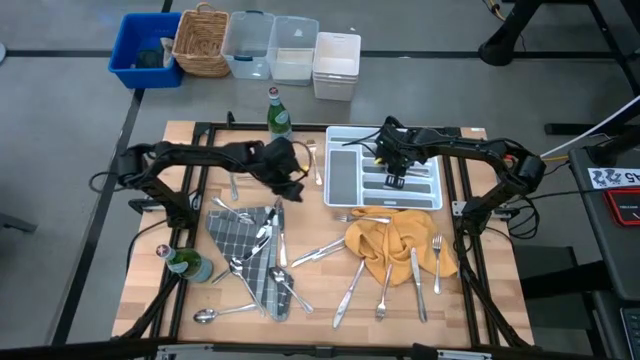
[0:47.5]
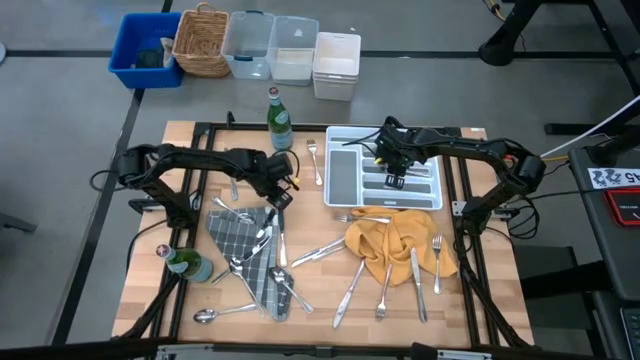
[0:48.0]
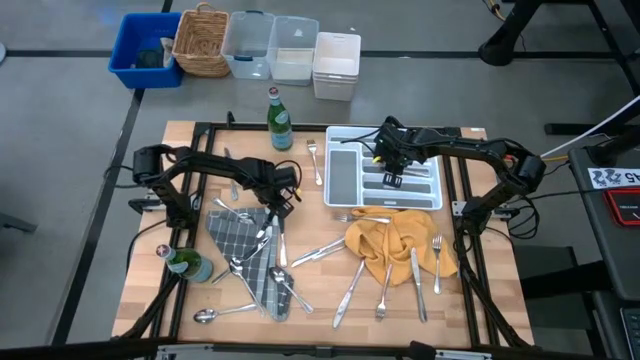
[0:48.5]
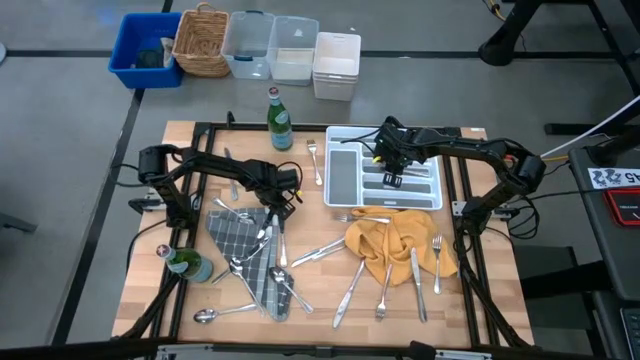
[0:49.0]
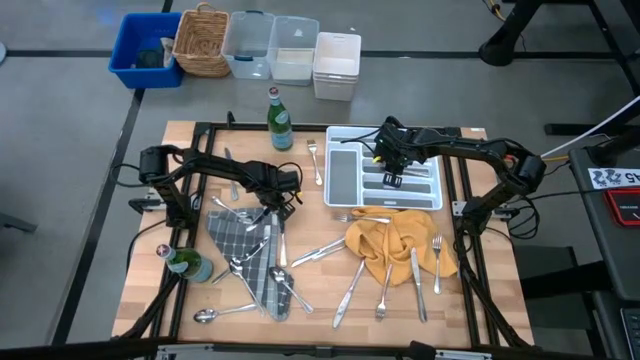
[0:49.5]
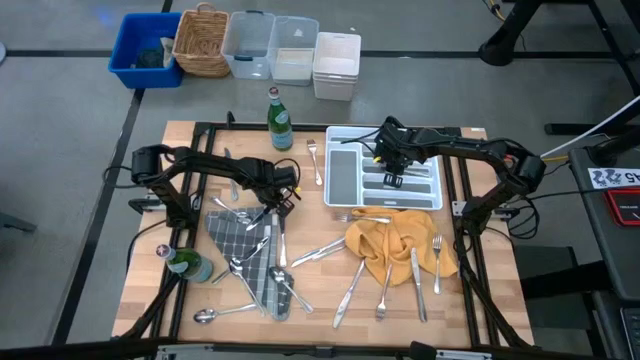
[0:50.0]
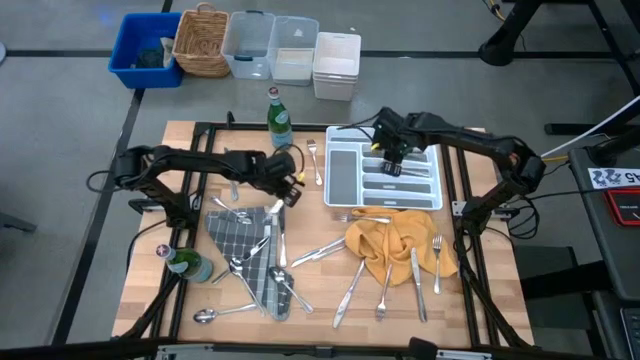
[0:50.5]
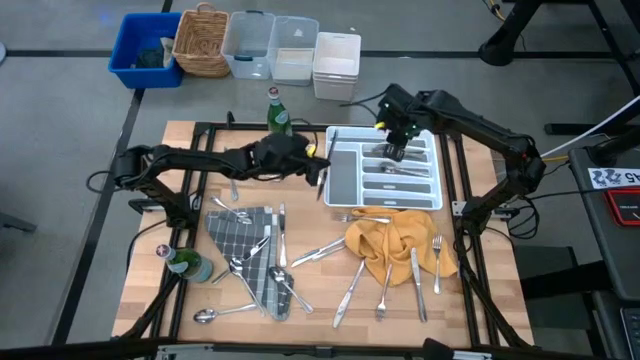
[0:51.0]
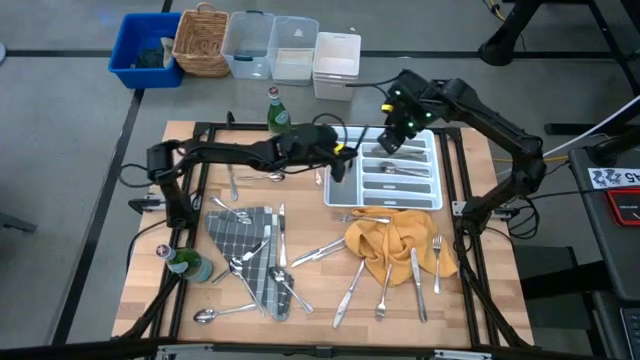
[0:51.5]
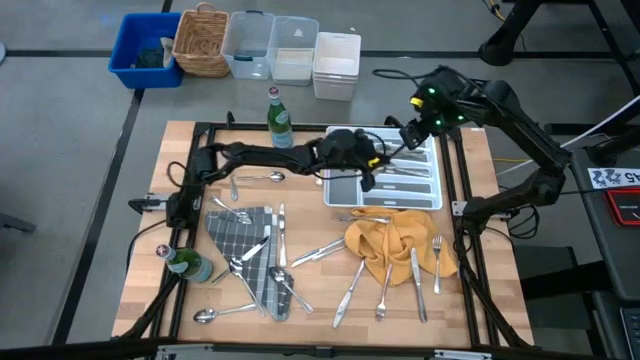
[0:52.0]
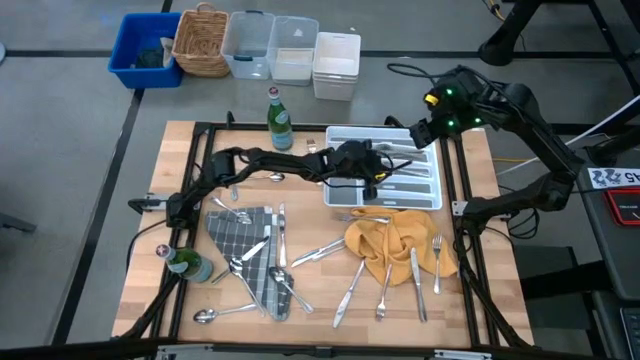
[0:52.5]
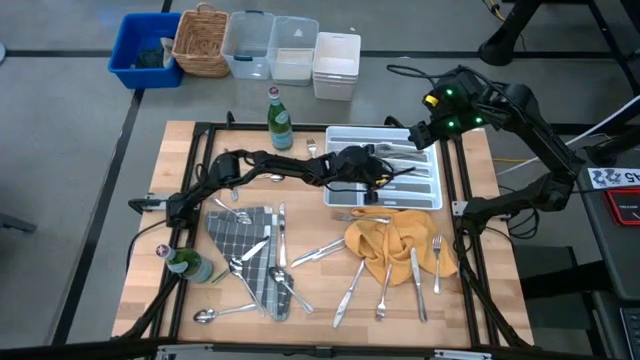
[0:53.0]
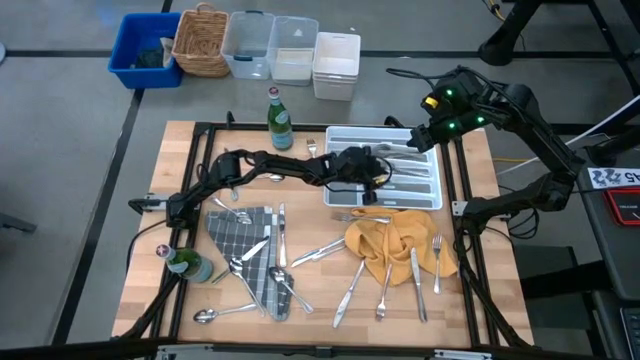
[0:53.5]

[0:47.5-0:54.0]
Put the silver knife into the cutlery tray

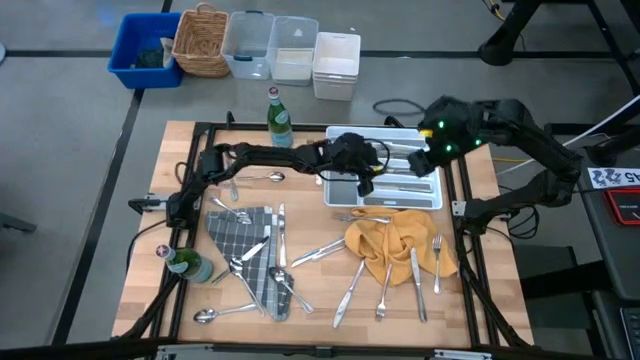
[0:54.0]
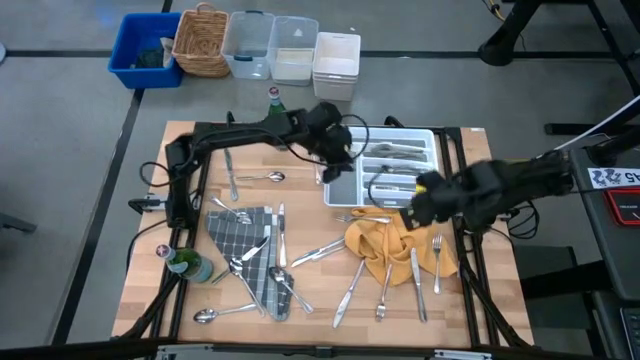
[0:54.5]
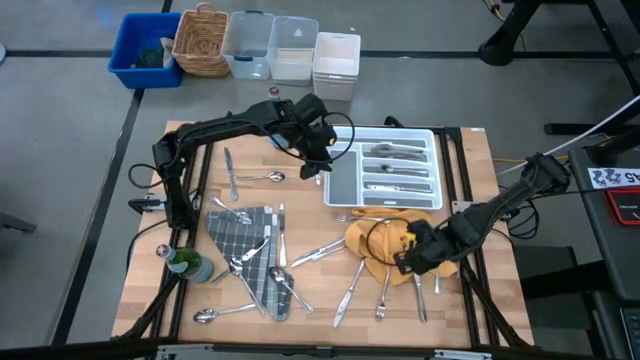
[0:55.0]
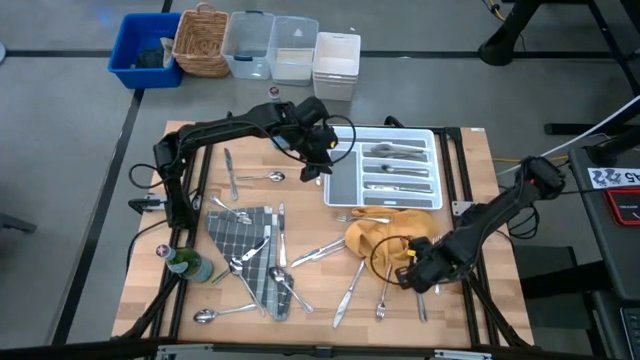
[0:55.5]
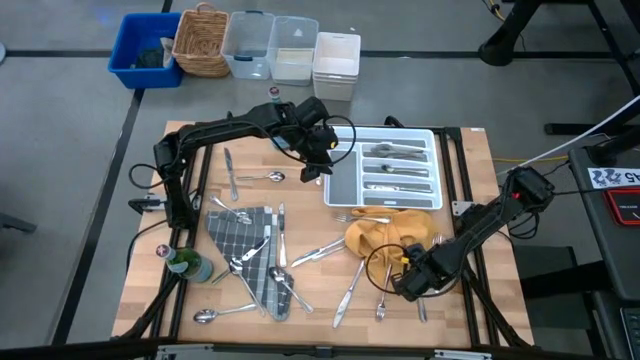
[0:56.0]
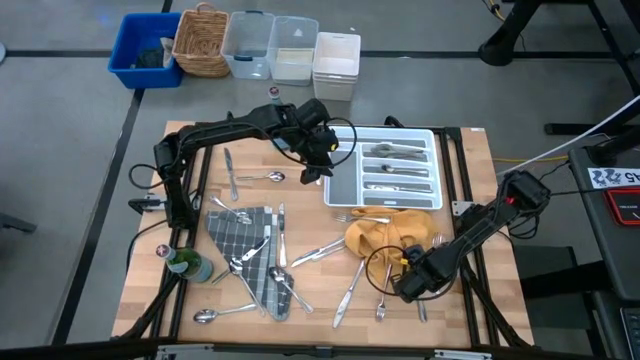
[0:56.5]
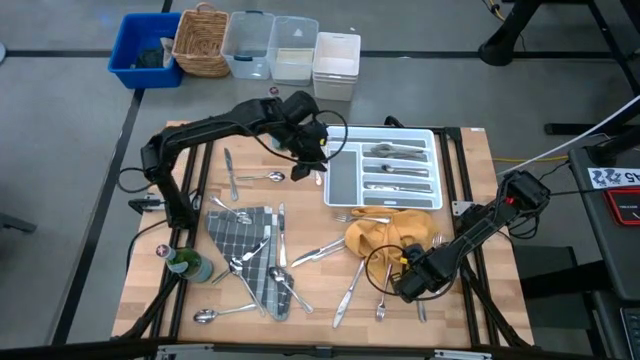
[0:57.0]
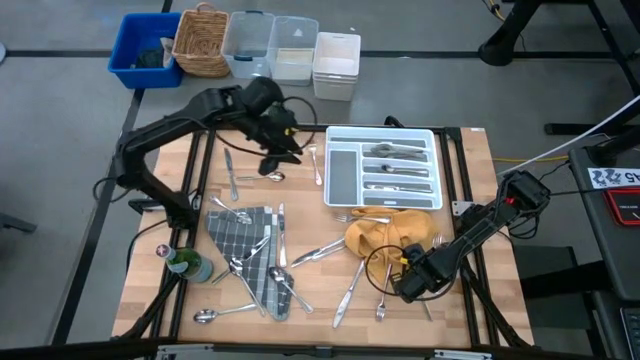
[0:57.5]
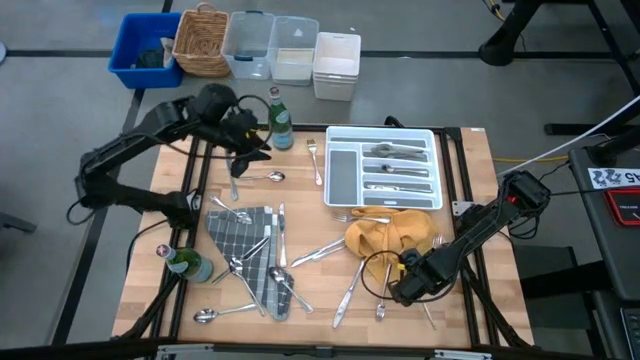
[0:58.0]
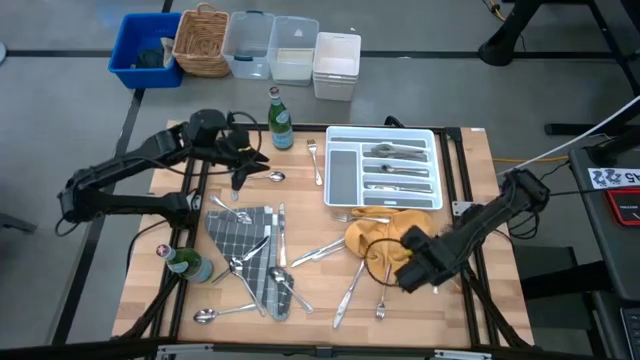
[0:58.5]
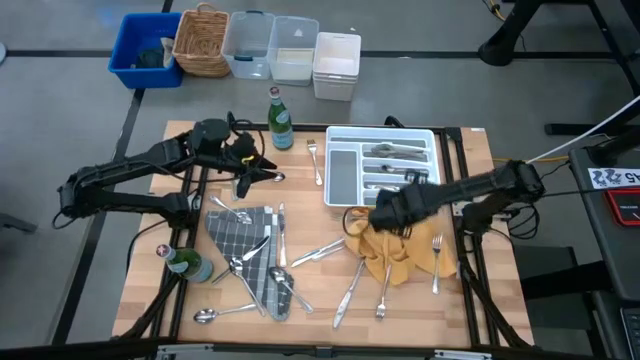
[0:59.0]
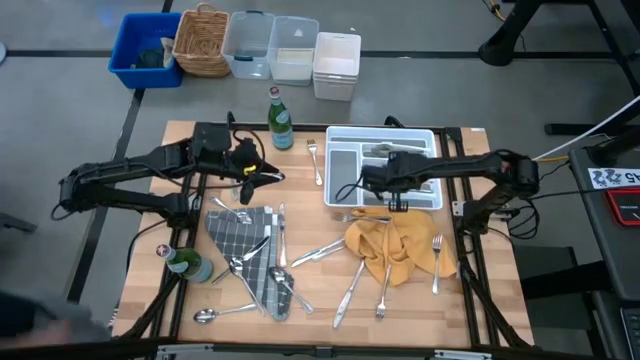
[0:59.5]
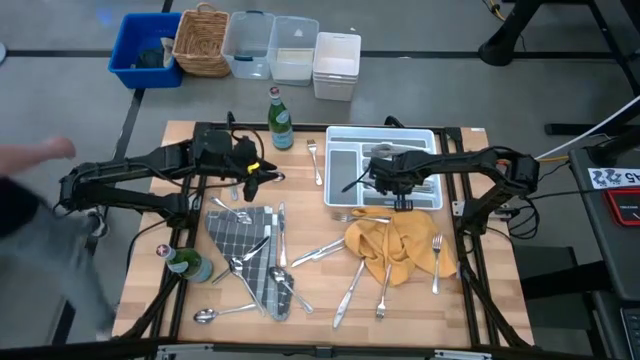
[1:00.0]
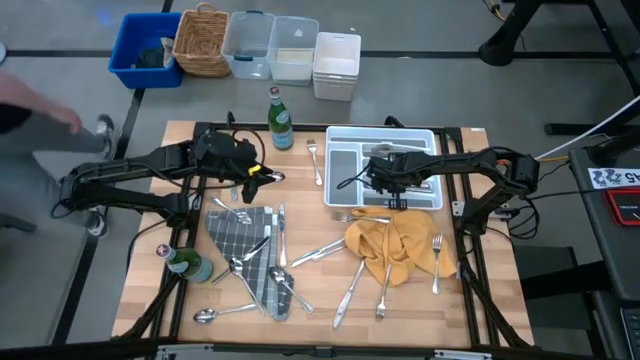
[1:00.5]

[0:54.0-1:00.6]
Put the silver knife into the cutlery tray

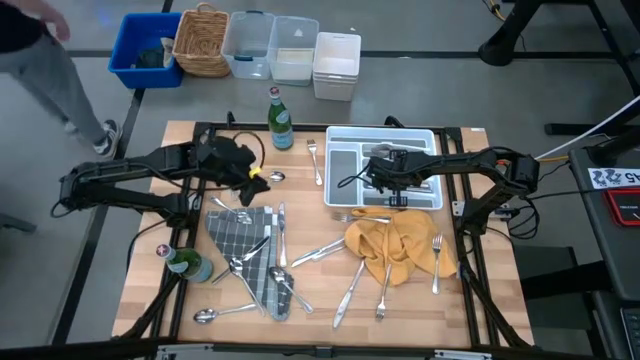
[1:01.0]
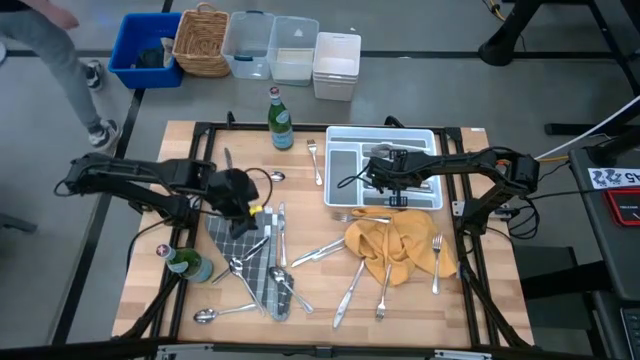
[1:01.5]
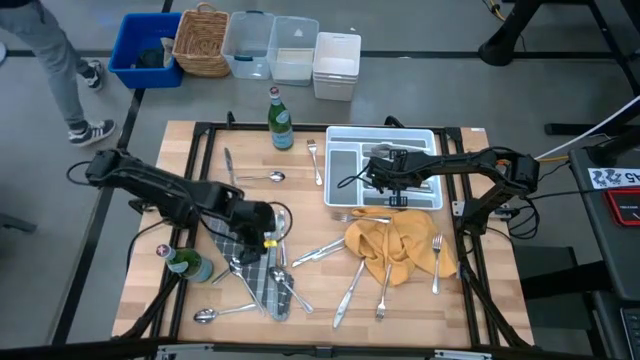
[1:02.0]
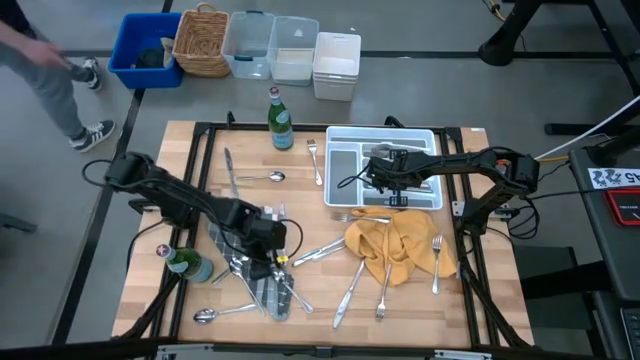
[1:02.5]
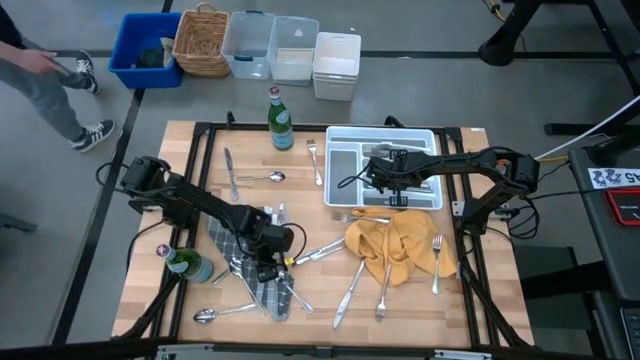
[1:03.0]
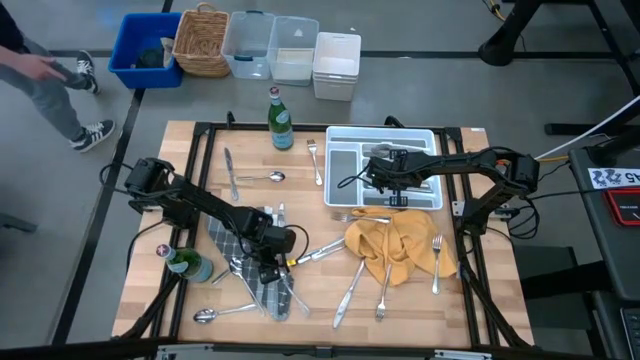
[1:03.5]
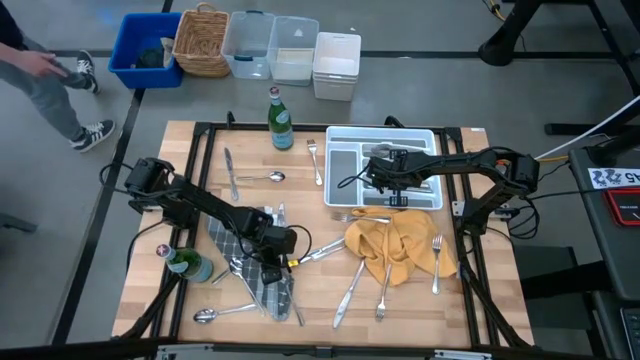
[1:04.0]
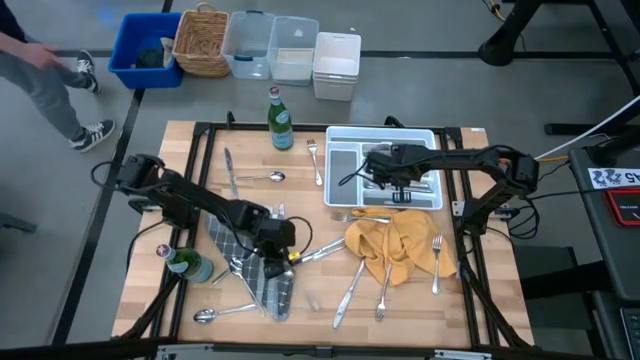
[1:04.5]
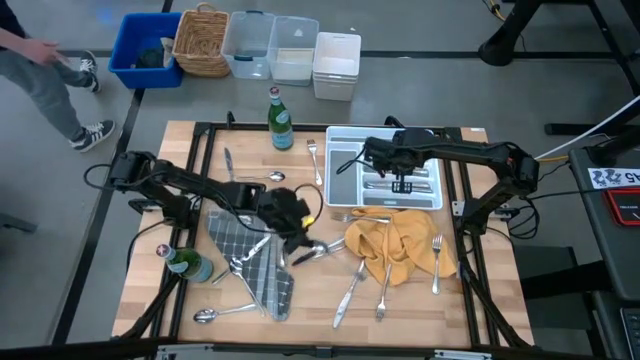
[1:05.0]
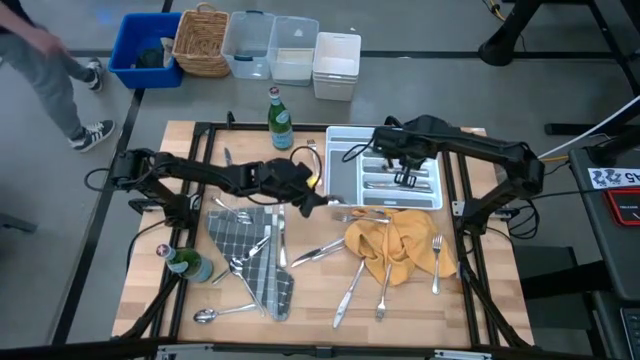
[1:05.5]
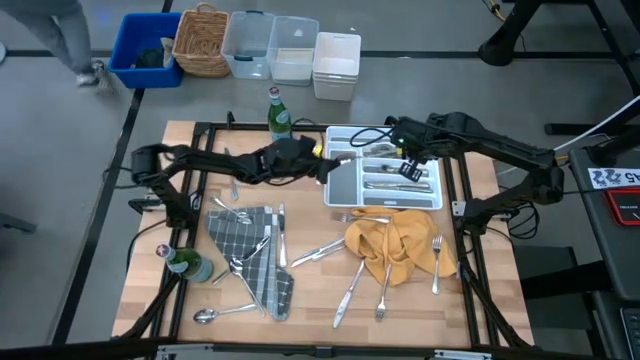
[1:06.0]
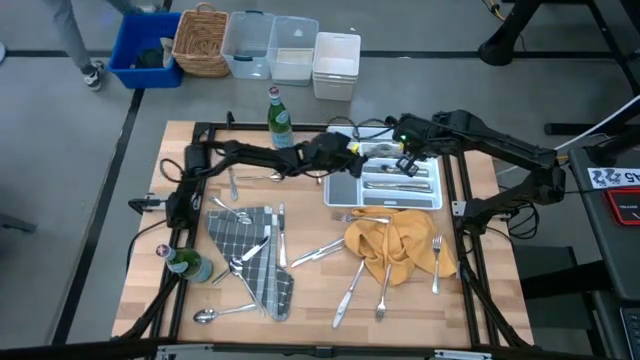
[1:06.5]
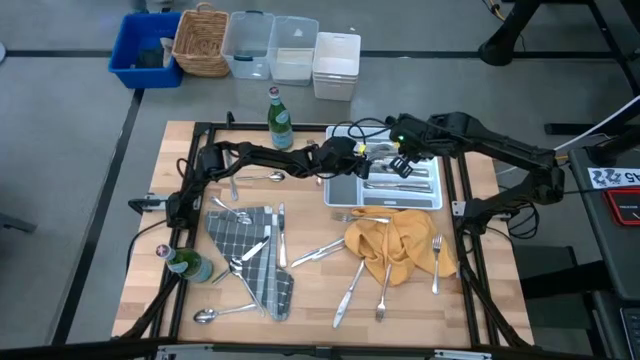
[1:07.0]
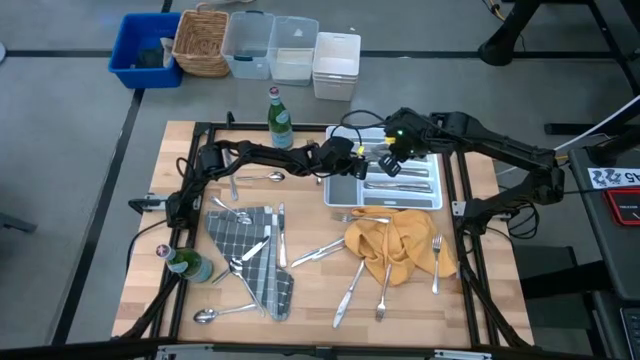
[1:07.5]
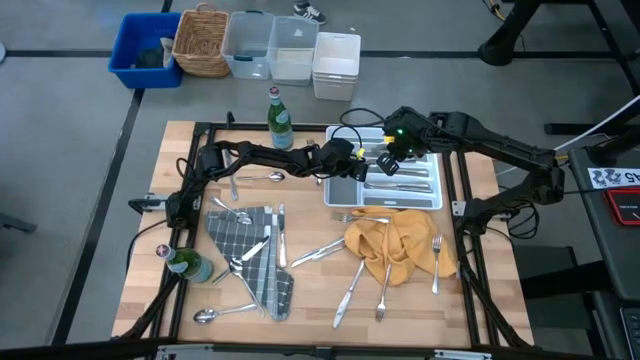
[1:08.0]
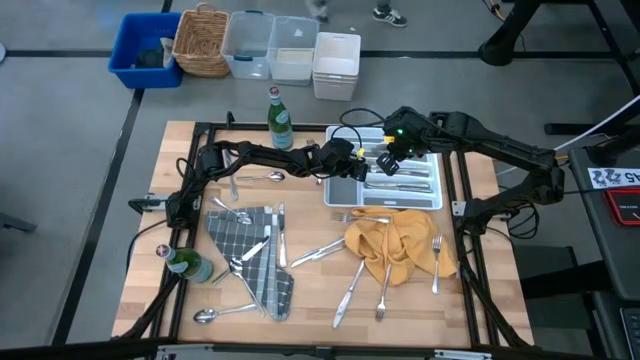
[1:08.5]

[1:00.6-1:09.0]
Put the silver spoon into the cutlery tray
